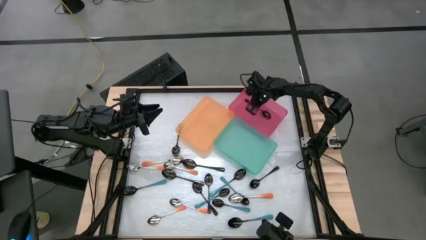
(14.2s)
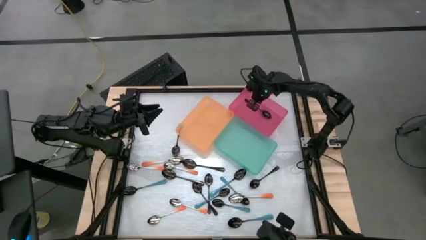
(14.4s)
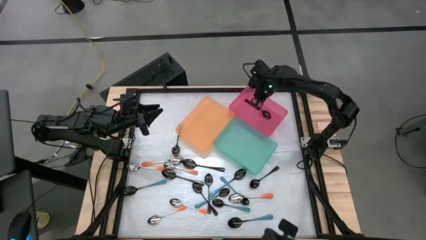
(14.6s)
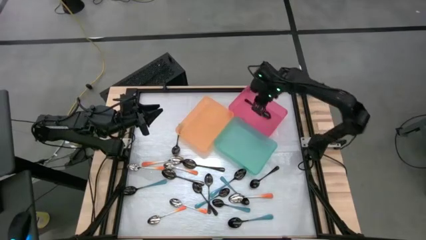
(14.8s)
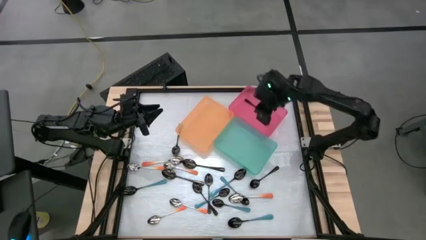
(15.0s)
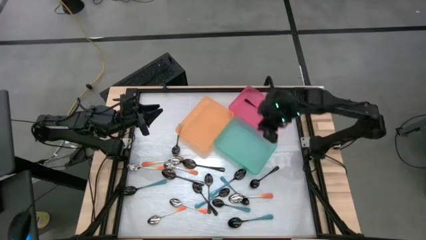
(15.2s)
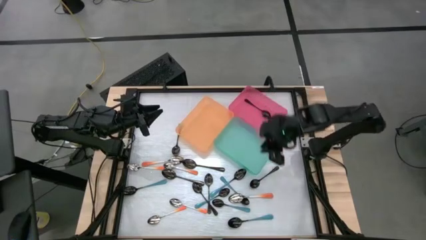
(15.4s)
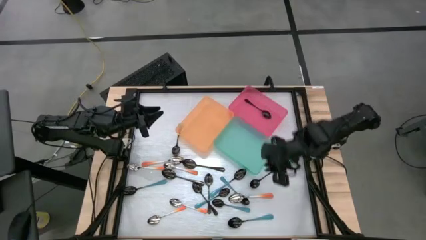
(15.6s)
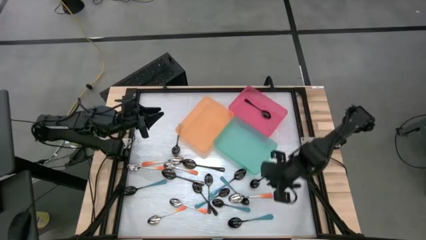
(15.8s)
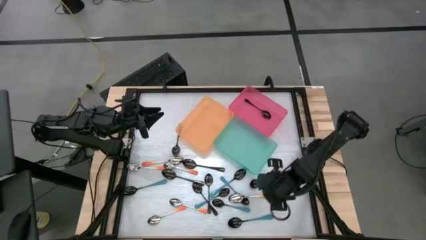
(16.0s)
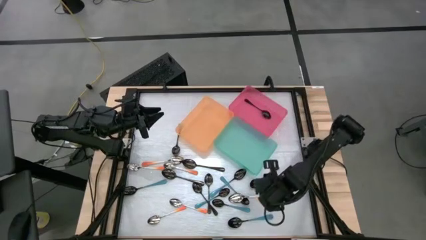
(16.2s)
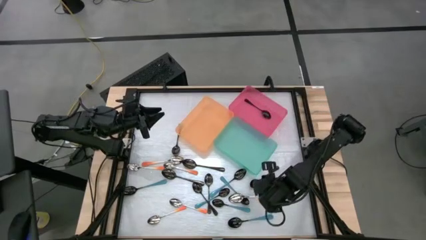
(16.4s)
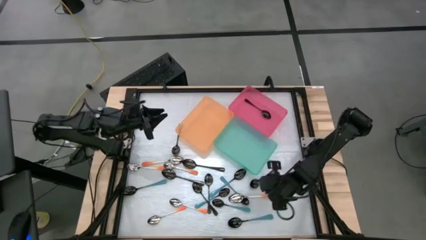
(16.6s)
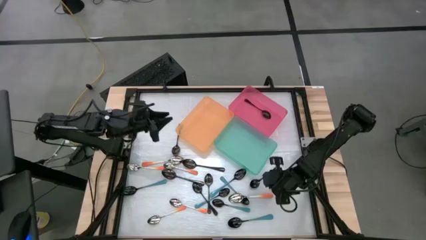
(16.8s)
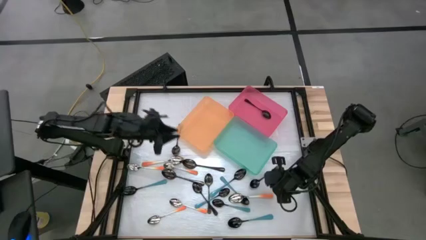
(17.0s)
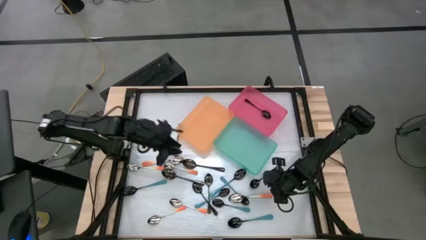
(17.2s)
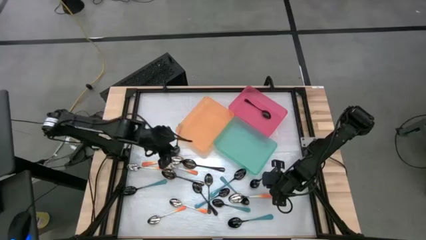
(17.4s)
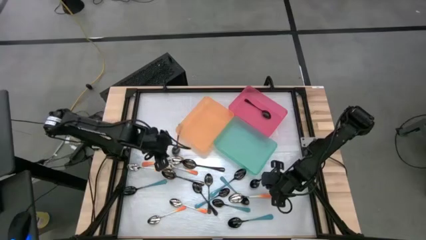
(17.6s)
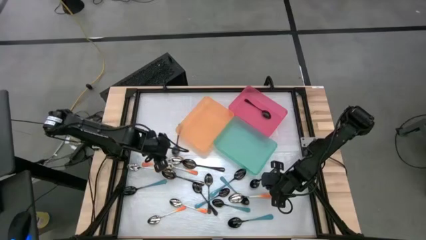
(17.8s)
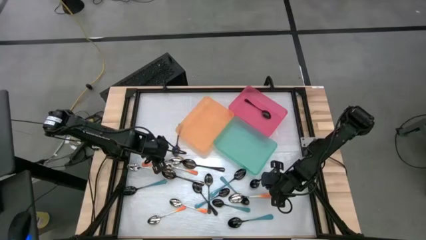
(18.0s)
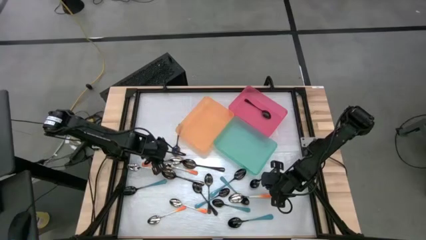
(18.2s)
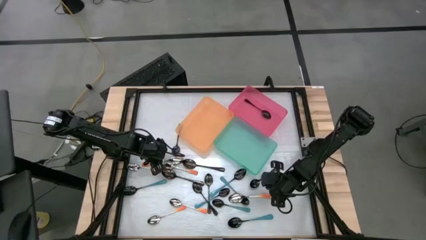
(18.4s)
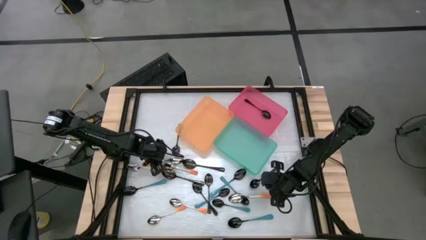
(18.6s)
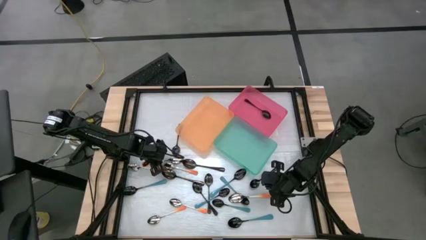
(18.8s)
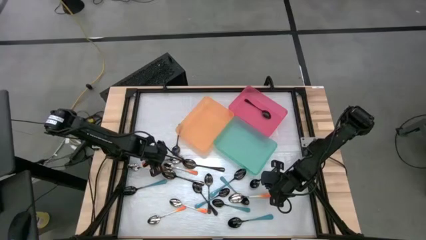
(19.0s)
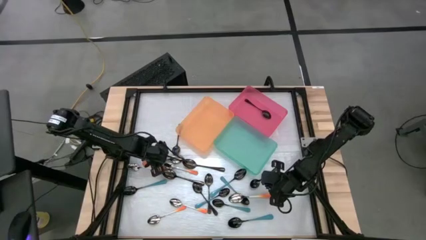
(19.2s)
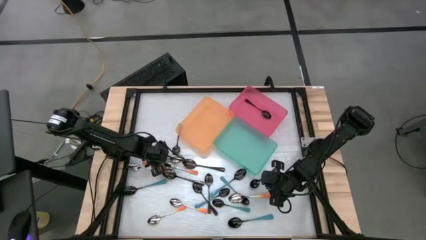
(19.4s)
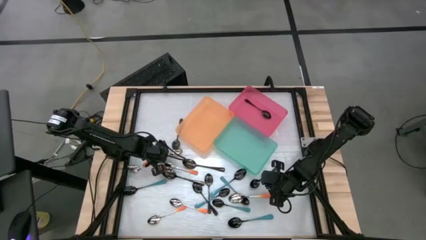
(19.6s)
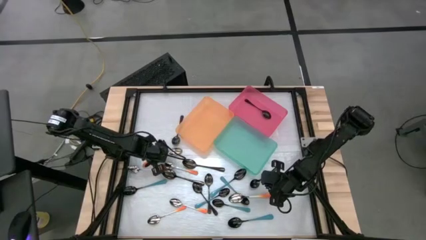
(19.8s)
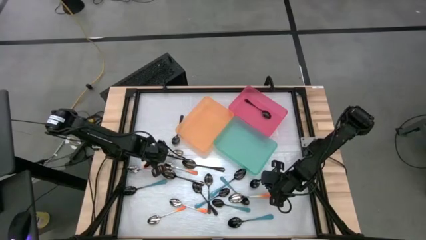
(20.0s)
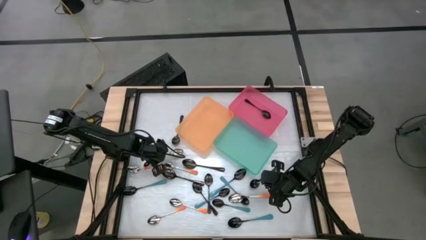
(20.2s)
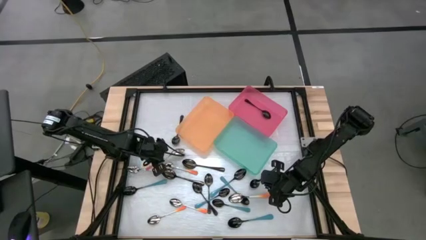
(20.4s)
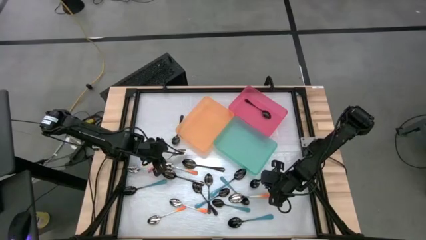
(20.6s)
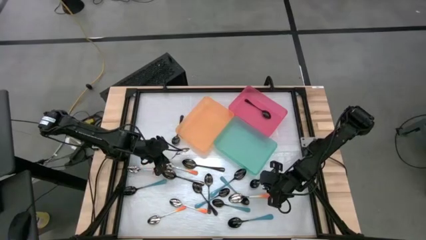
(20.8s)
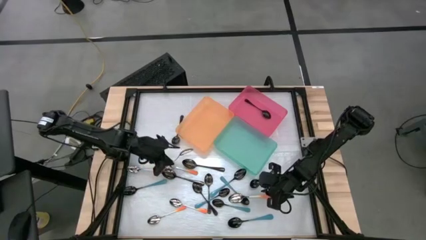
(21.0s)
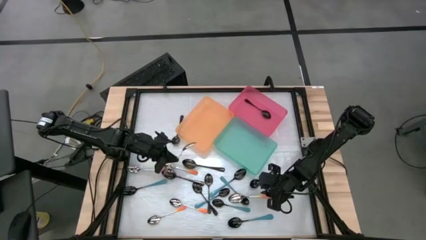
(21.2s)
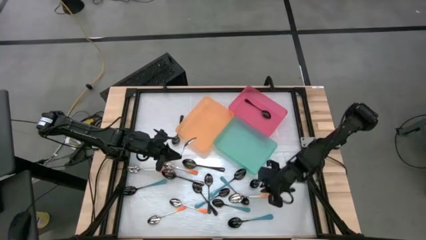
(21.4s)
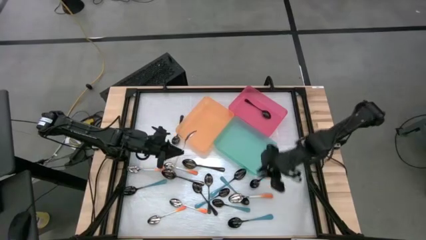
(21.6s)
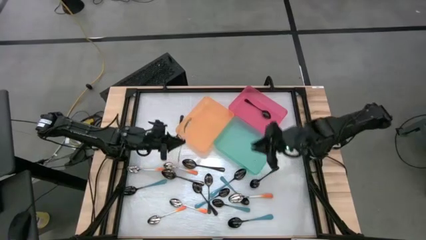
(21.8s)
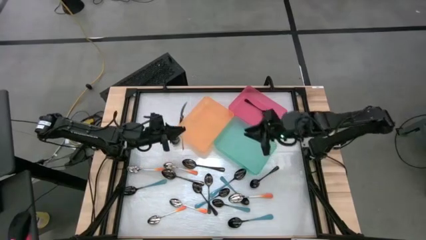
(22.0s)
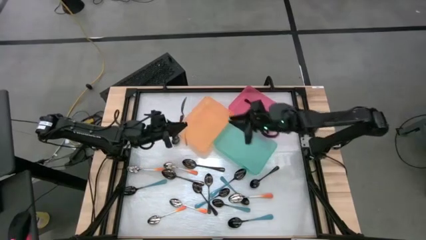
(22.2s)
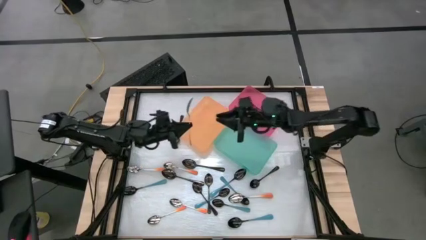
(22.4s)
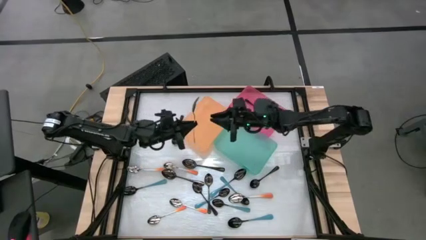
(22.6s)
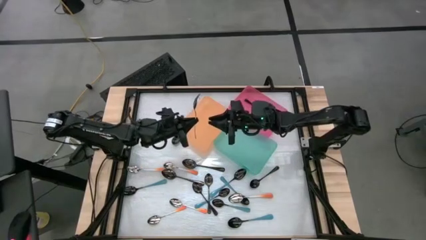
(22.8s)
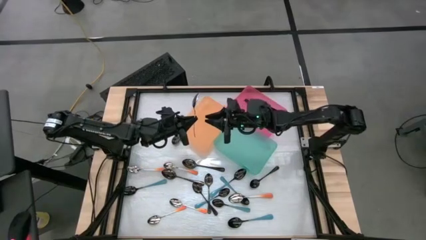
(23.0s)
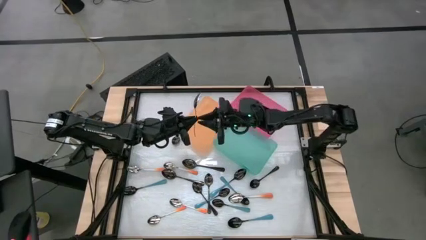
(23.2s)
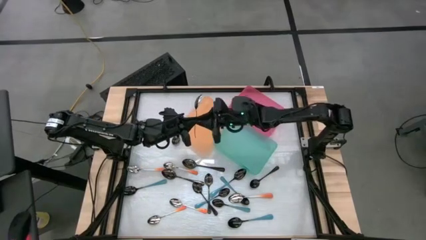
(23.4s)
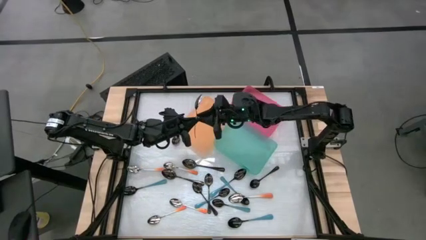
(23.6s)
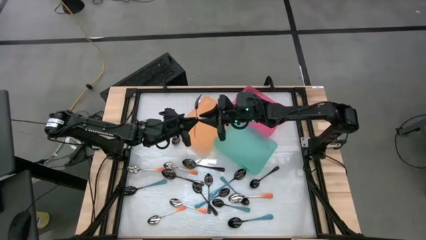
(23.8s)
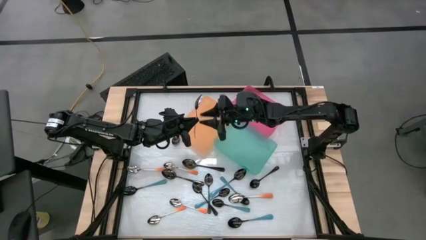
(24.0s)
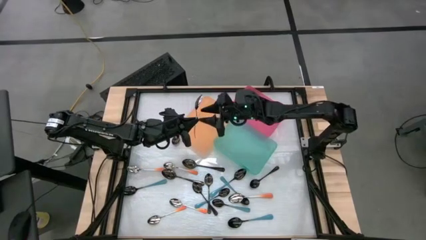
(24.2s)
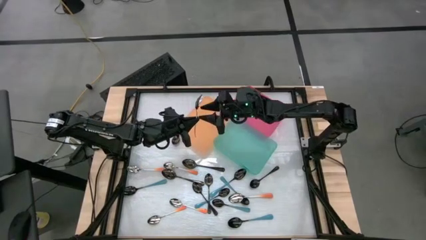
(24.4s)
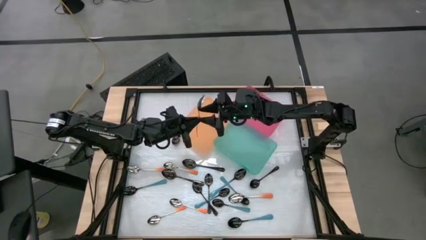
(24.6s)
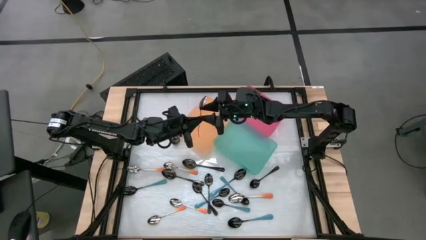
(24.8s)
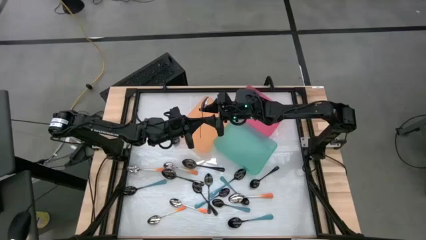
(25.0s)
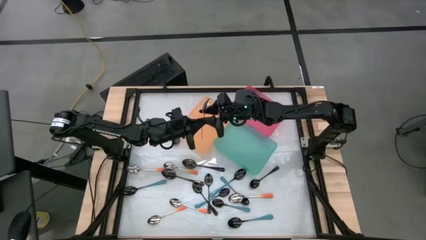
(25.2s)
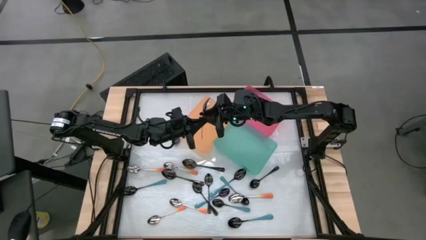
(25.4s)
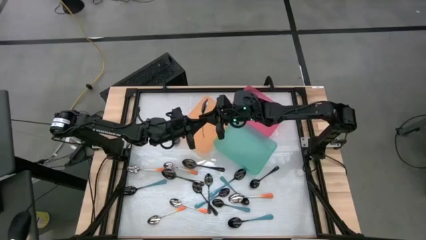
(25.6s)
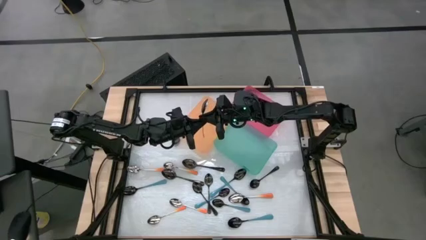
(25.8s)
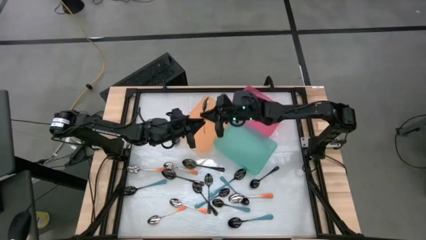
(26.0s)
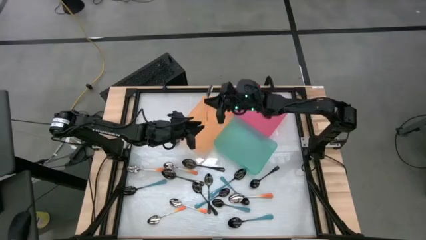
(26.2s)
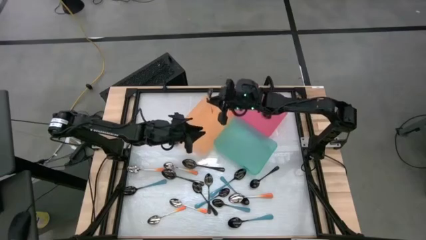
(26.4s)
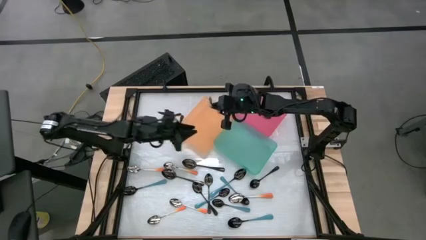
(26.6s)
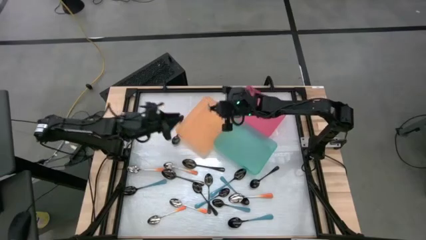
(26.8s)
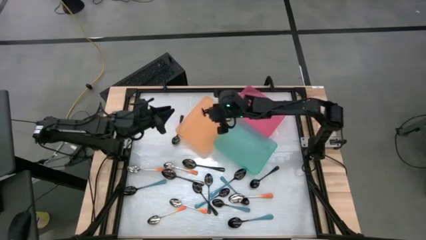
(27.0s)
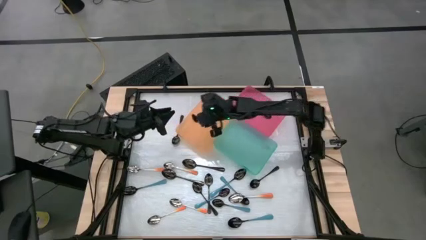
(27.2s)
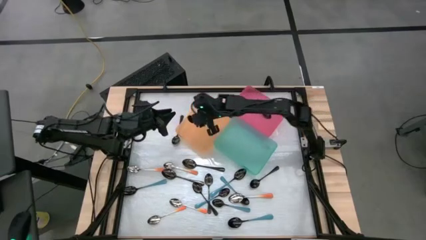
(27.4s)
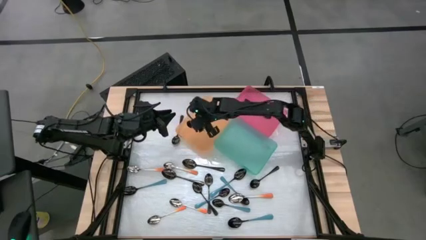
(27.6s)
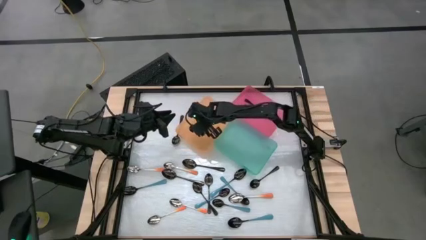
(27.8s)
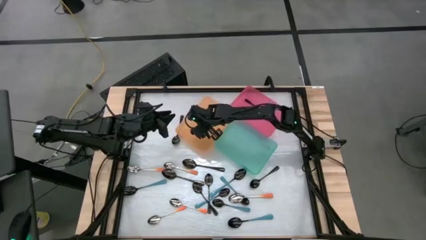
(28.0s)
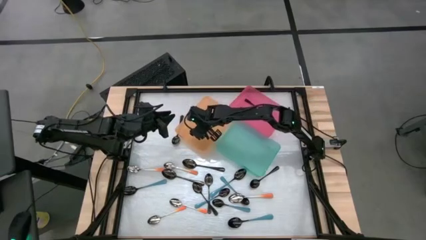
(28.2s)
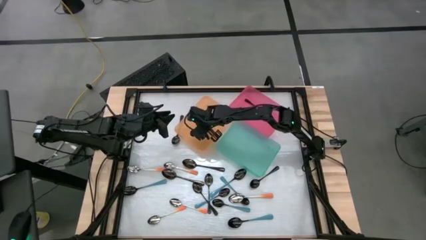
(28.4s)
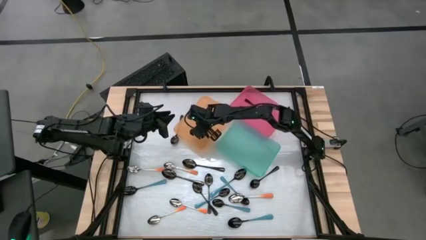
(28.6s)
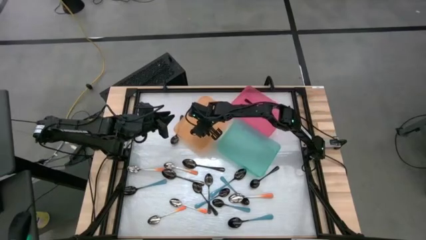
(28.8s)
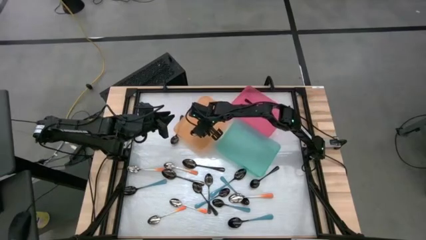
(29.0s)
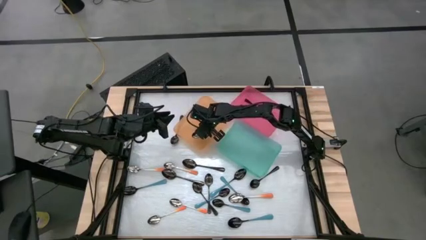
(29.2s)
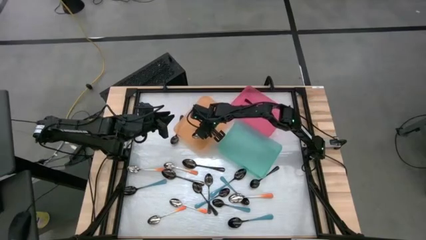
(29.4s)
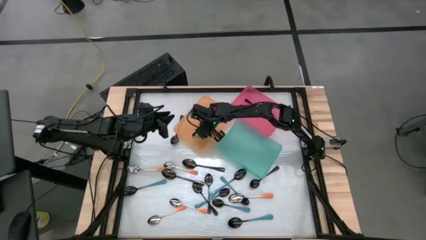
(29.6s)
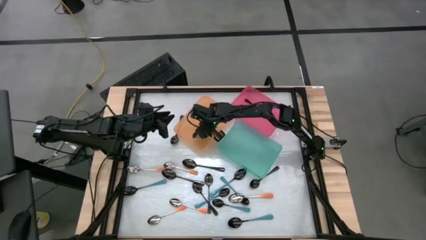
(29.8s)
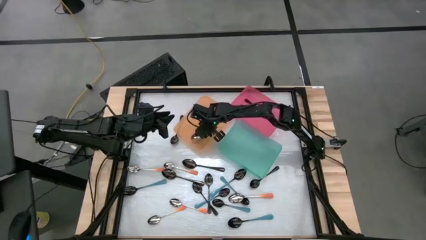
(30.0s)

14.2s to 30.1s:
Task: Sort silverware by color (type)
Put the orange spoon into the orange bin
